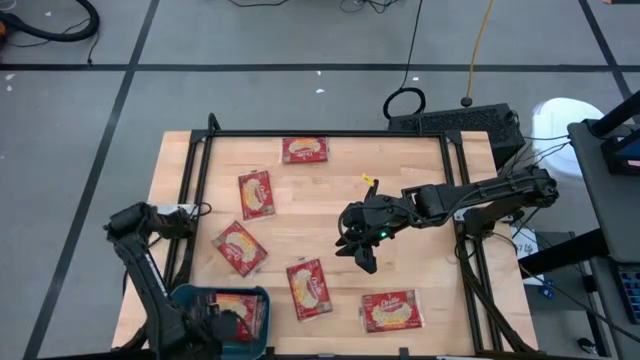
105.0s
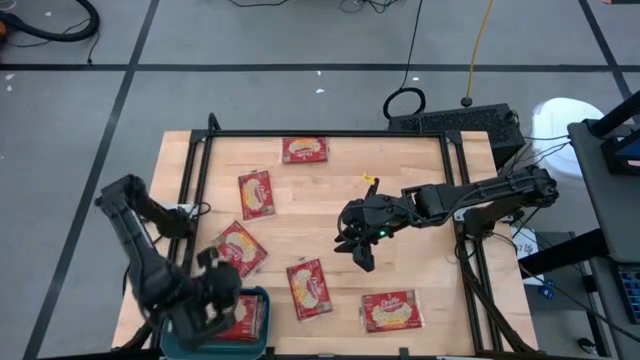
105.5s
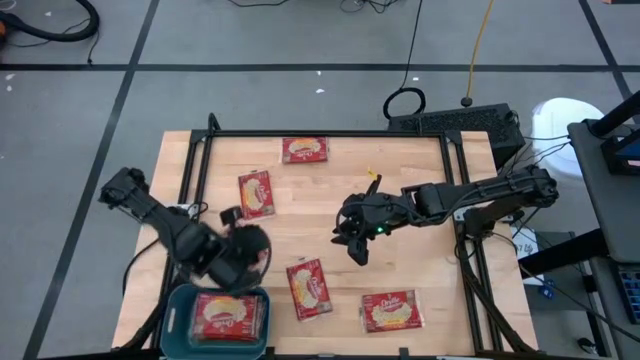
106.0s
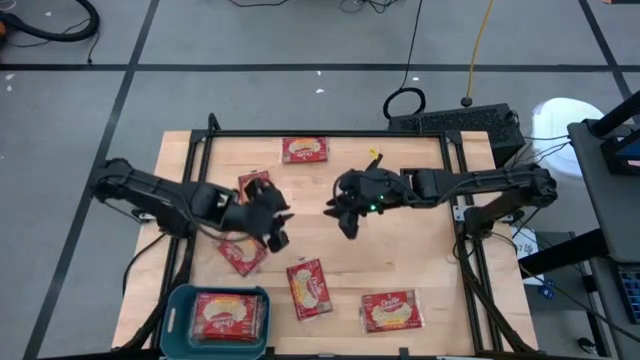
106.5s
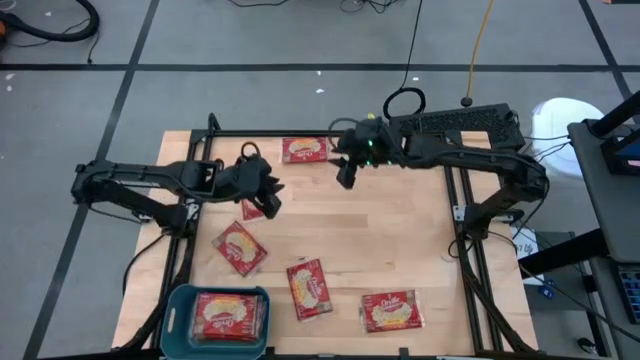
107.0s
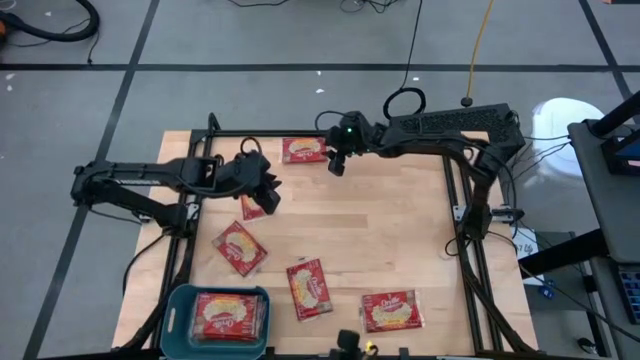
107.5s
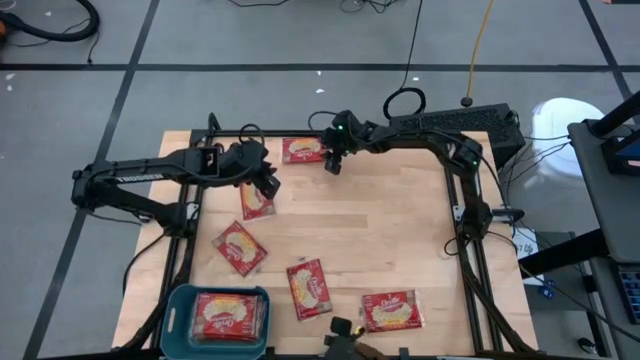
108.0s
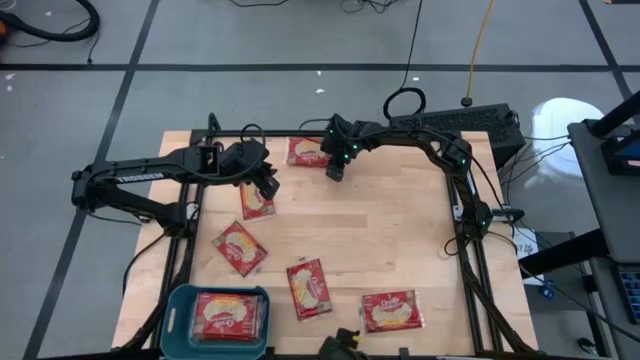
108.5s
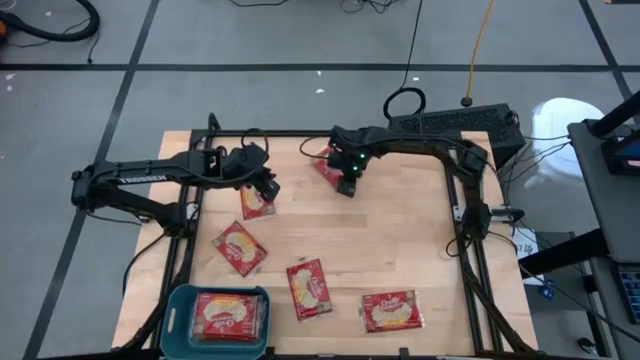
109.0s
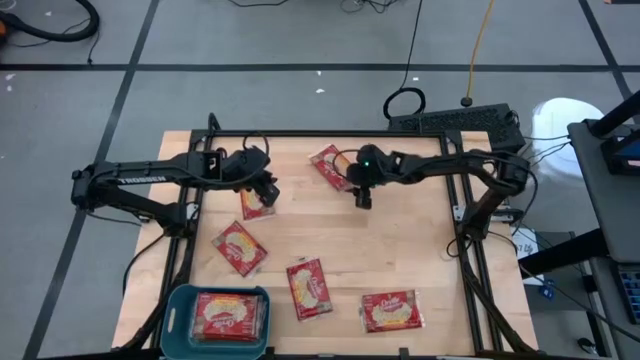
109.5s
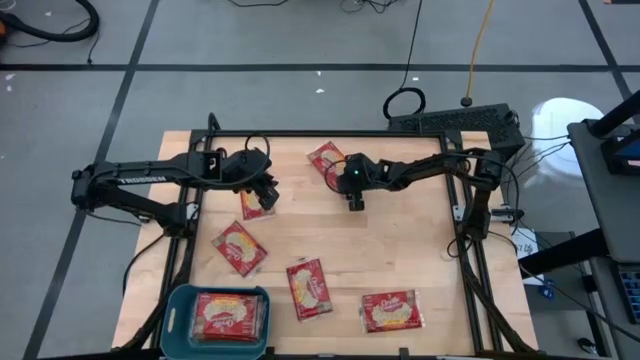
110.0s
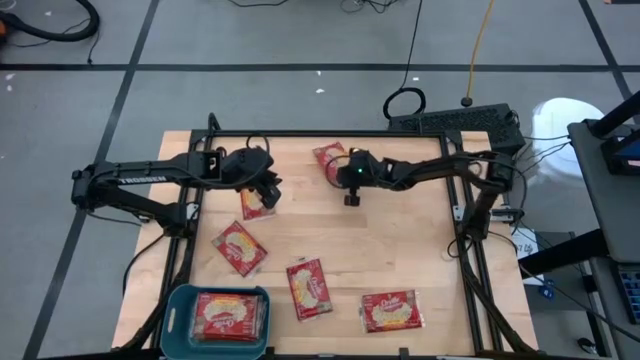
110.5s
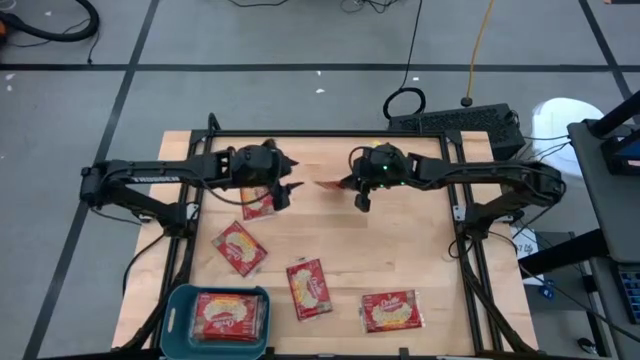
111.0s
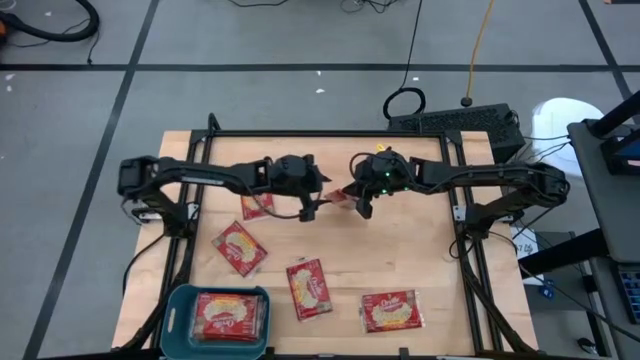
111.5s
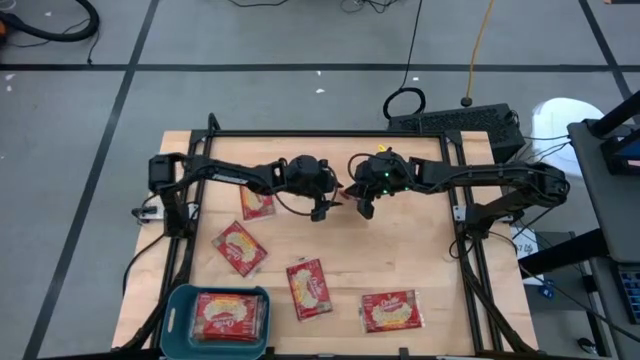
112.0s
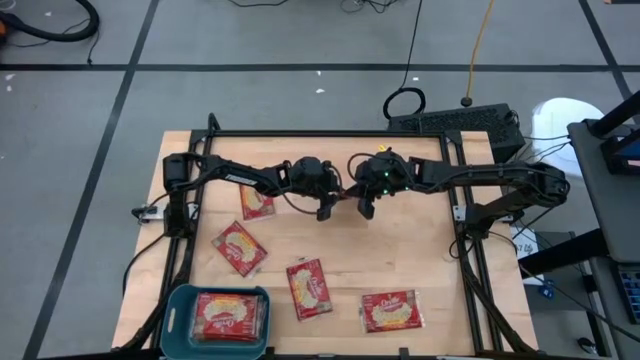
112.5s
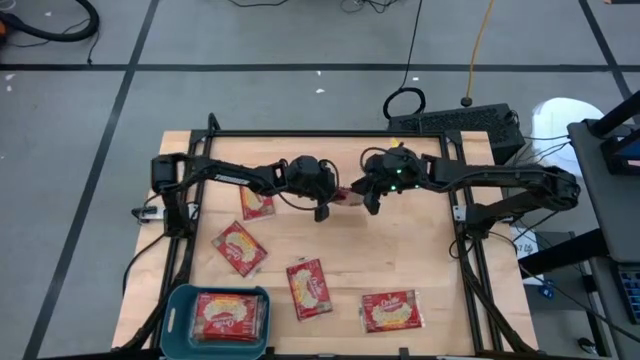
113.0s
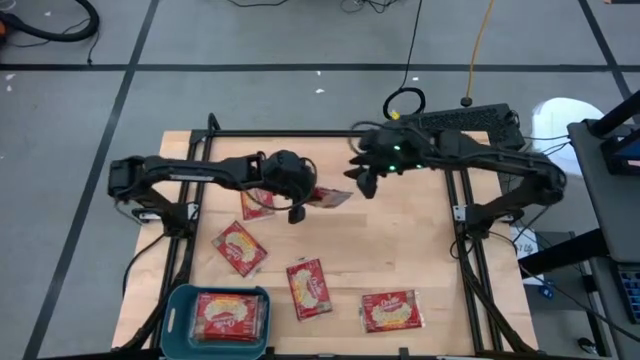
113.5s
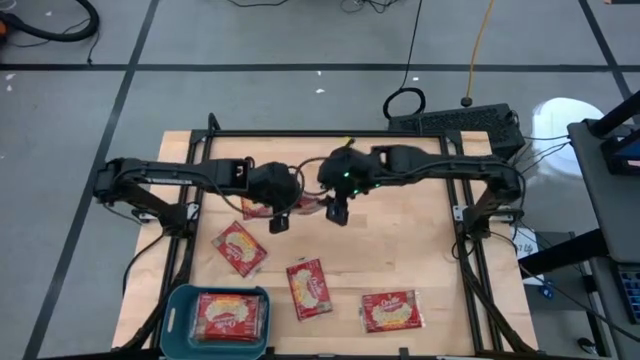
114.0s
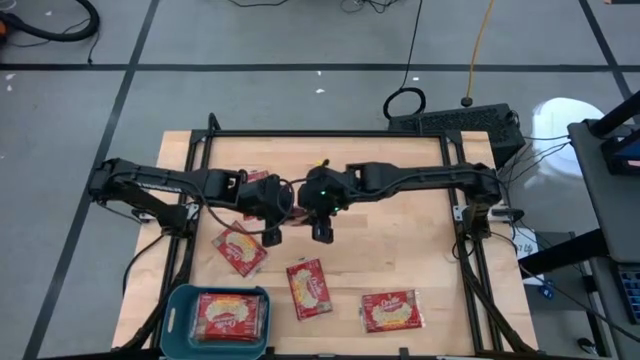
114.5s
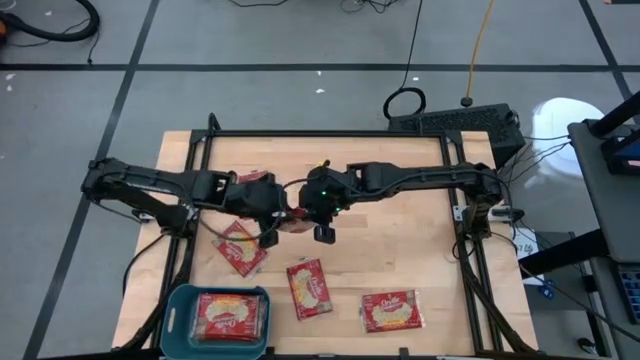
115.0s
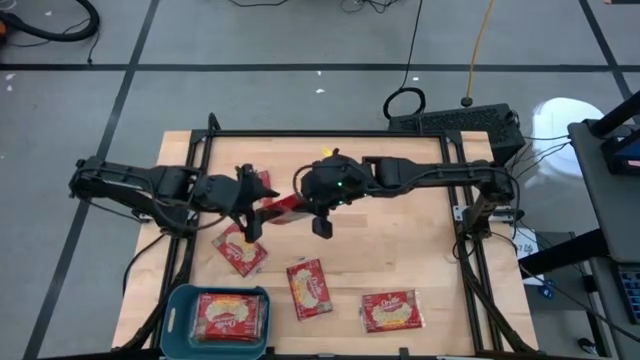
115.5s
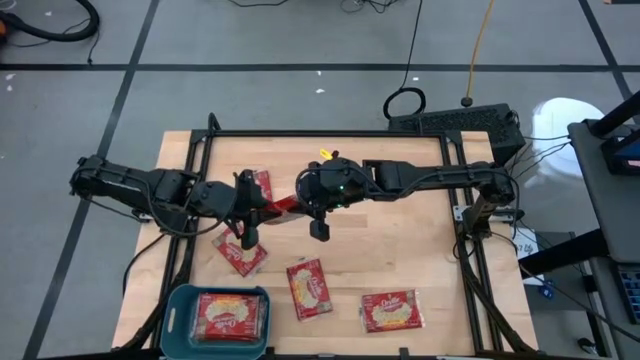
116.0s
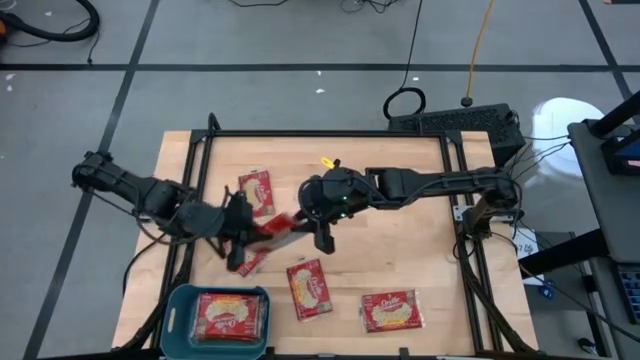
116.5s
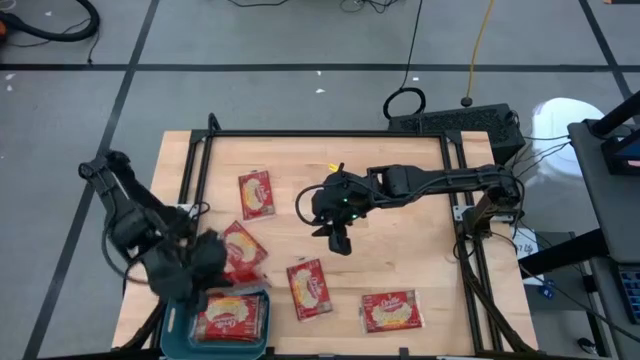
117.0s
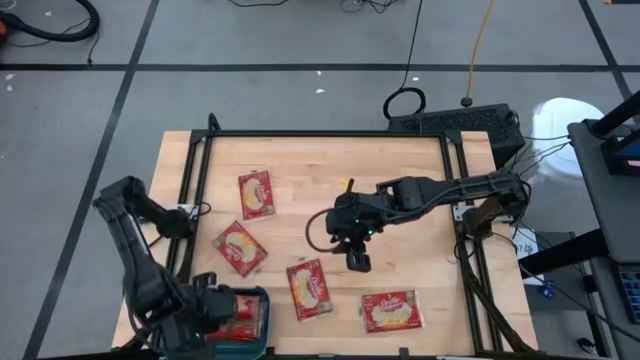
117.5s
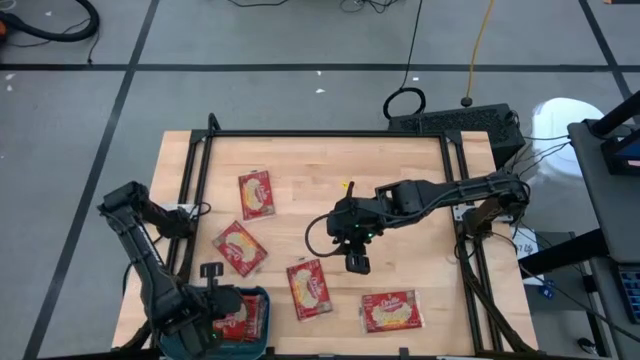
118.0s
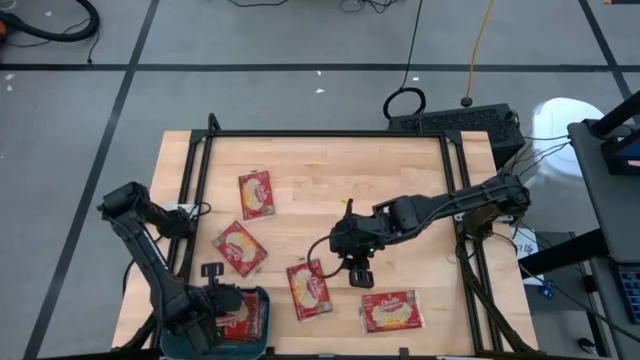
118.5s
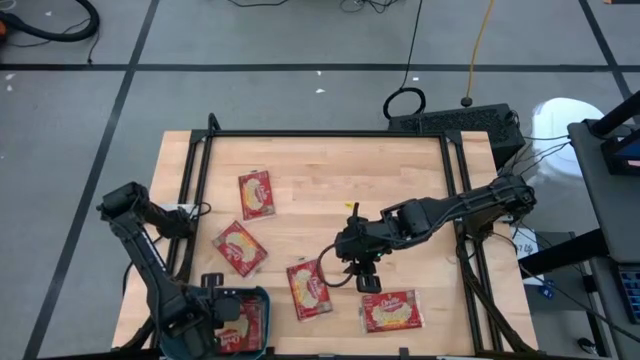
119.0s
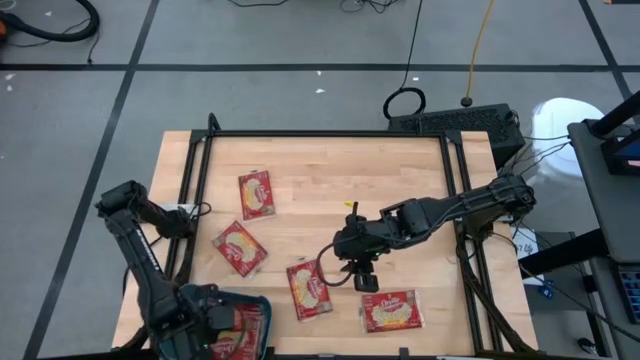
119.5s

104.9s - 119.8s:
Task: Sort popcorn bags into baskets
Put the popcorn sachet into the bin

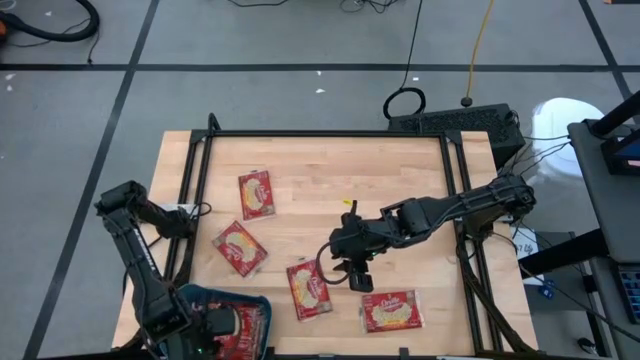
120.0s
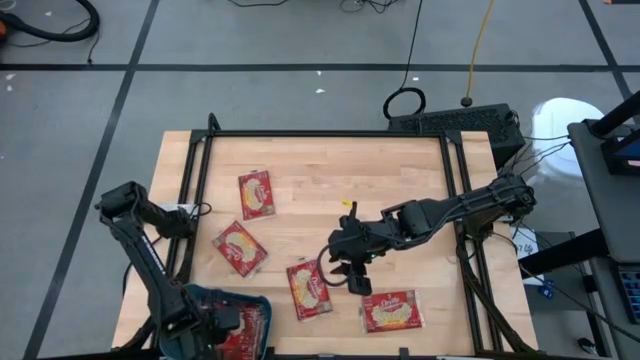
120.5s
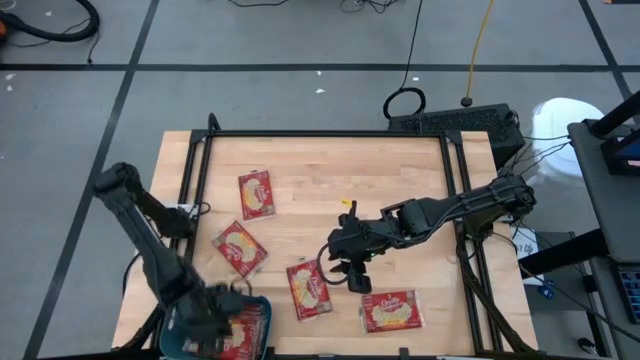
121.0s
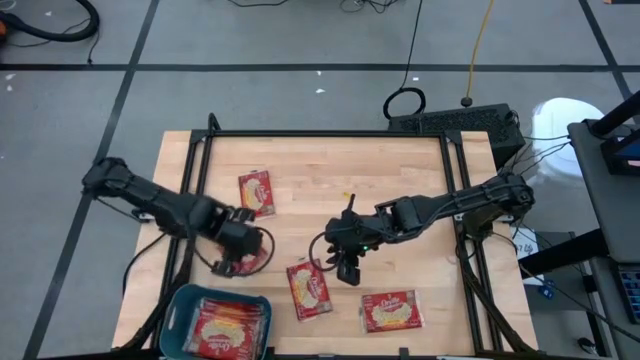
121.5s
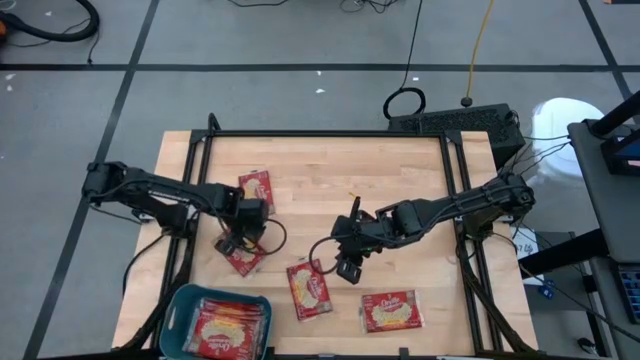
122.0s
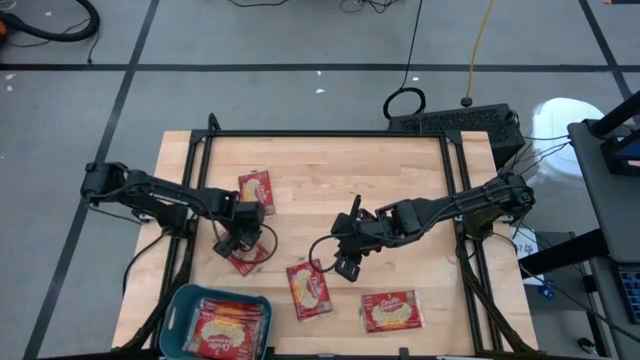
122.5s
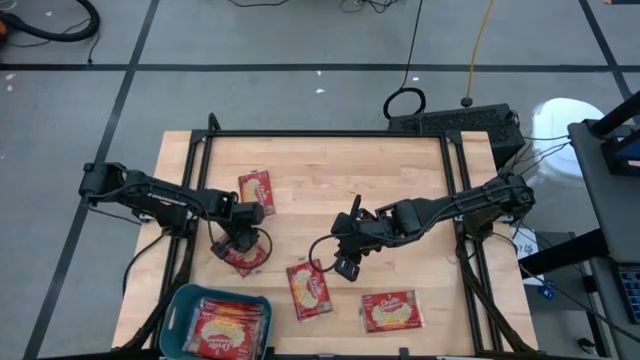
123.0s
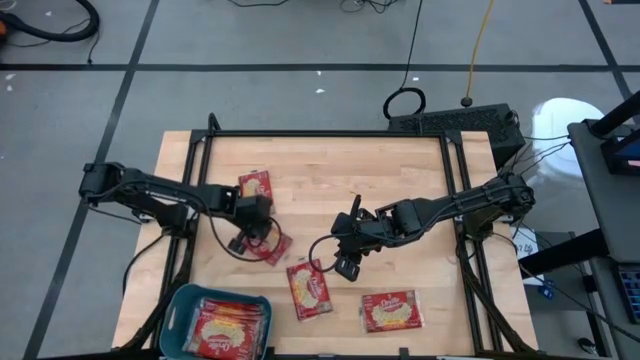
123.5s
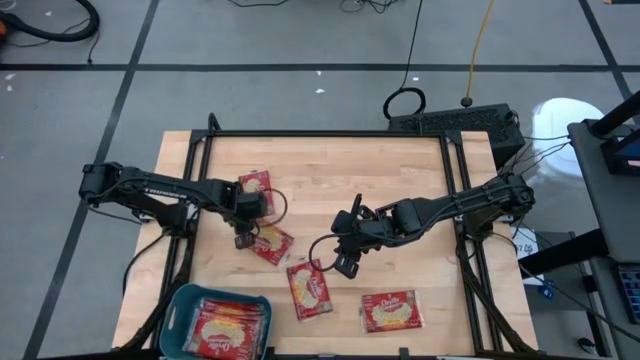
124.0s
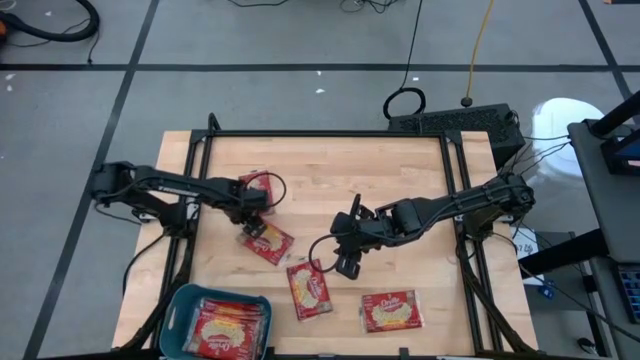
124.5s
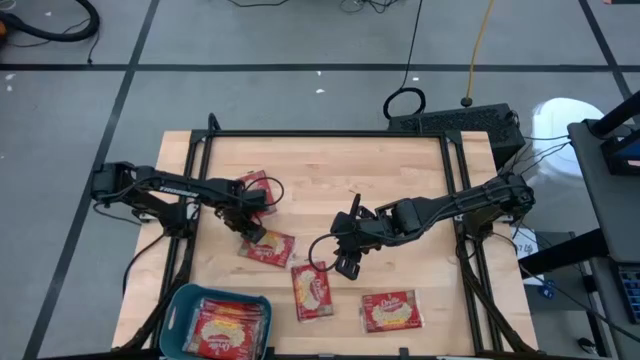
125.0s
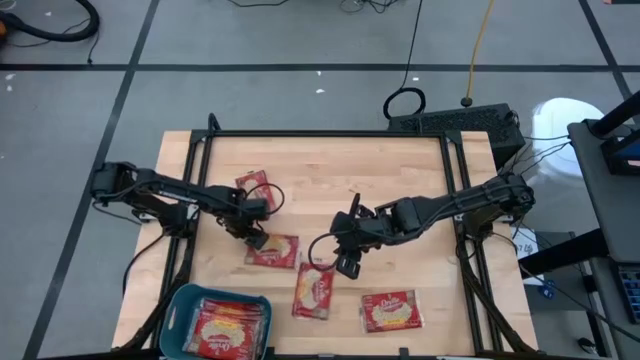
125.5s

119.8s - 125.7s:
Put the popcorn sachet into the bin
